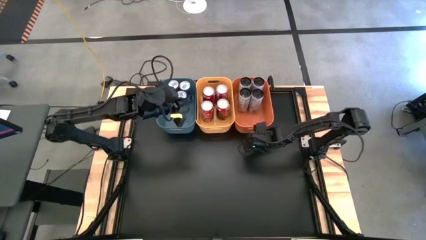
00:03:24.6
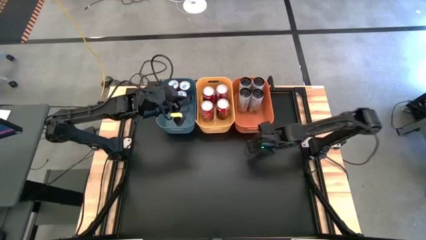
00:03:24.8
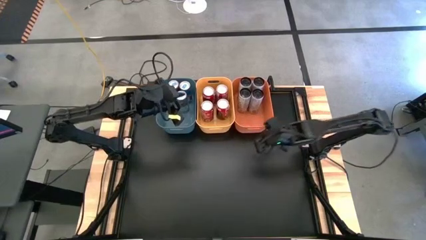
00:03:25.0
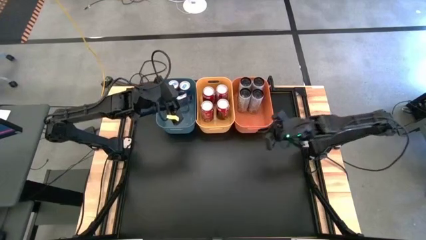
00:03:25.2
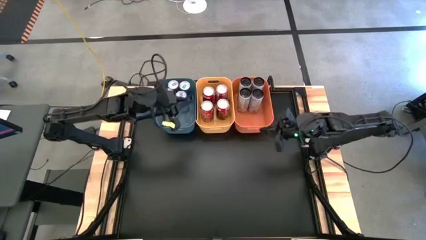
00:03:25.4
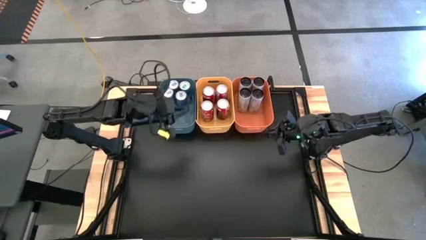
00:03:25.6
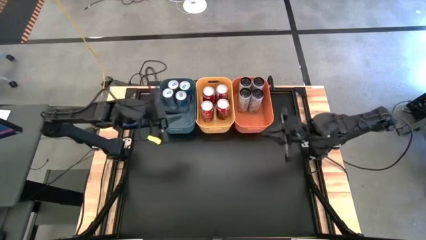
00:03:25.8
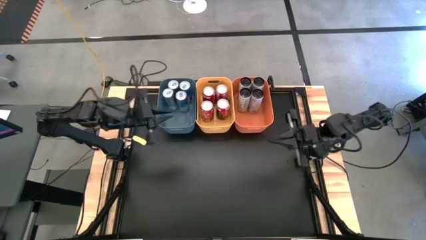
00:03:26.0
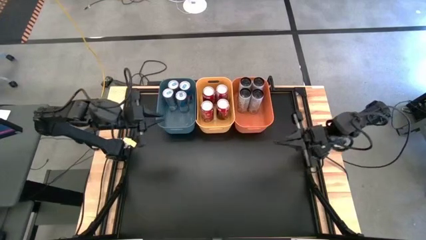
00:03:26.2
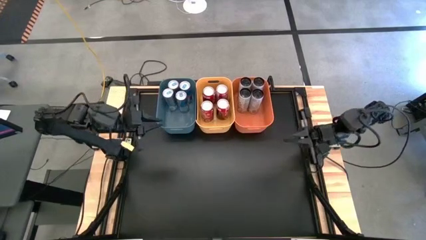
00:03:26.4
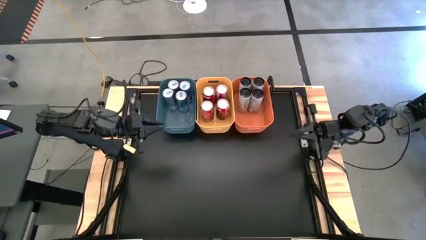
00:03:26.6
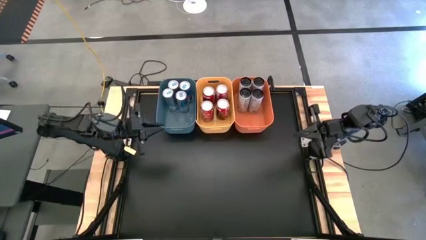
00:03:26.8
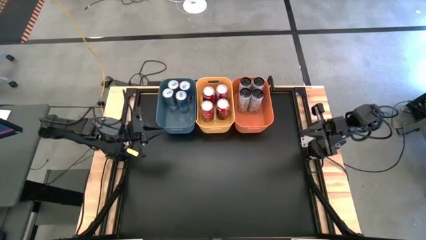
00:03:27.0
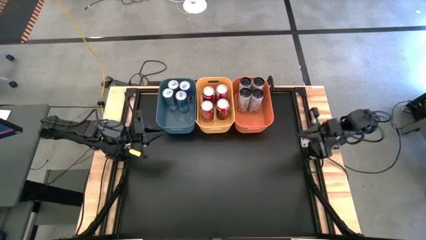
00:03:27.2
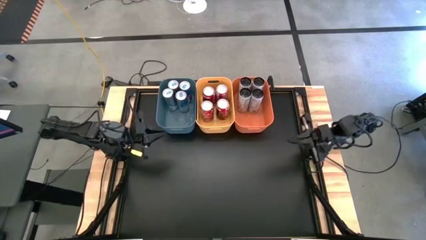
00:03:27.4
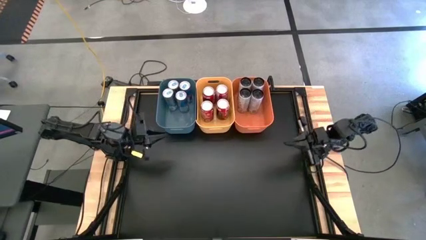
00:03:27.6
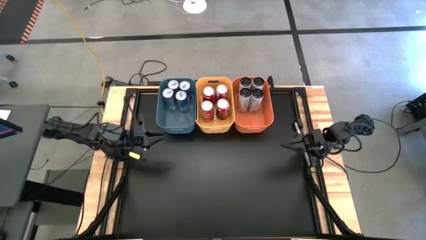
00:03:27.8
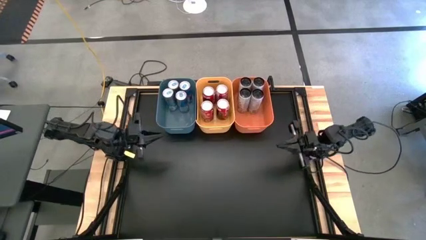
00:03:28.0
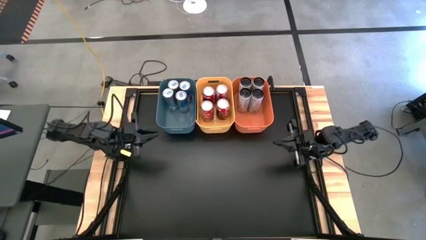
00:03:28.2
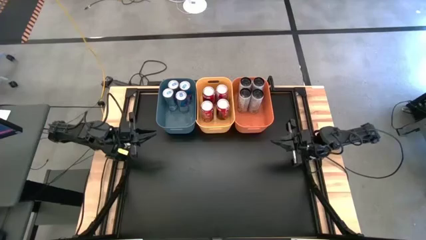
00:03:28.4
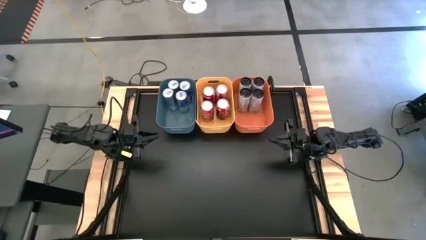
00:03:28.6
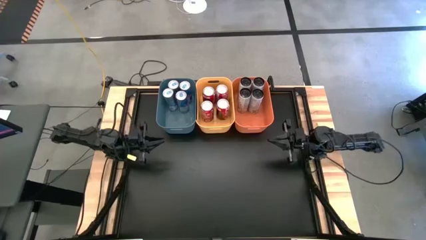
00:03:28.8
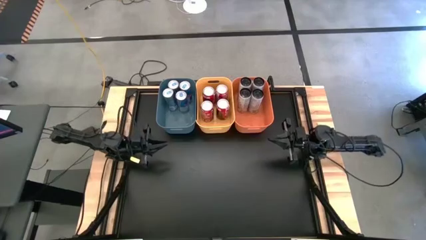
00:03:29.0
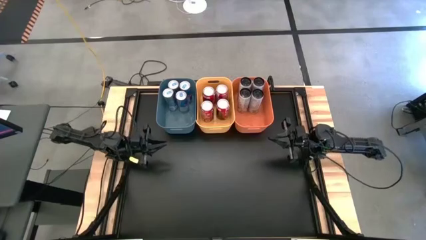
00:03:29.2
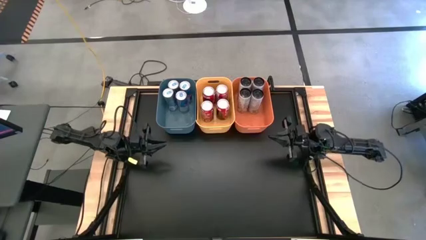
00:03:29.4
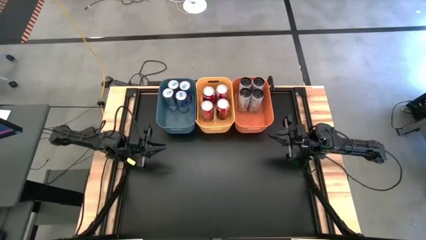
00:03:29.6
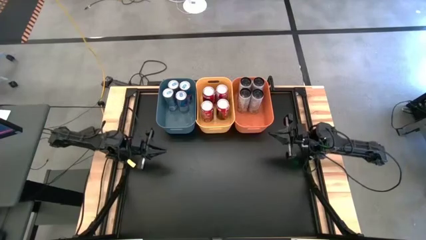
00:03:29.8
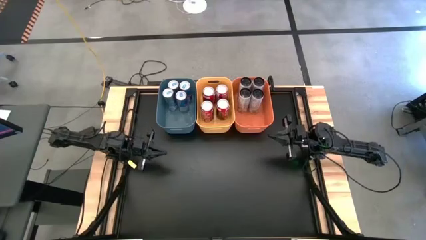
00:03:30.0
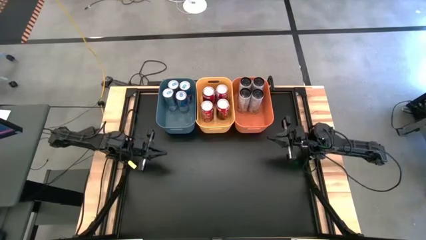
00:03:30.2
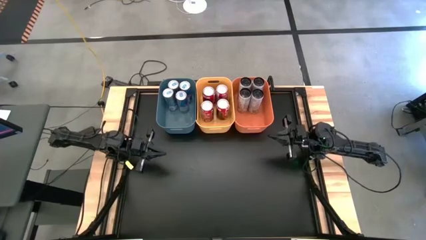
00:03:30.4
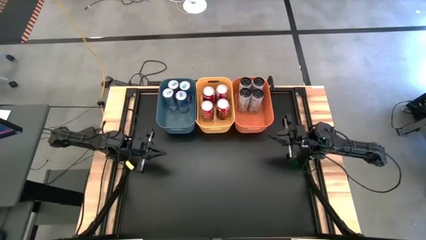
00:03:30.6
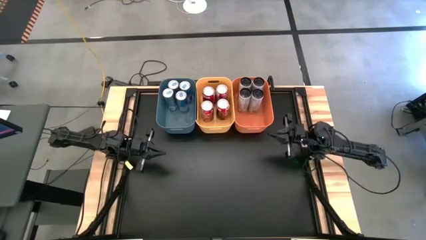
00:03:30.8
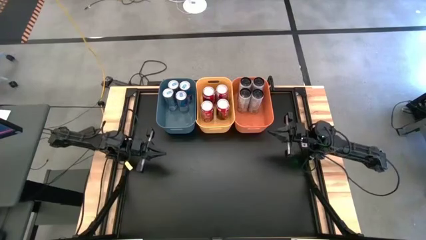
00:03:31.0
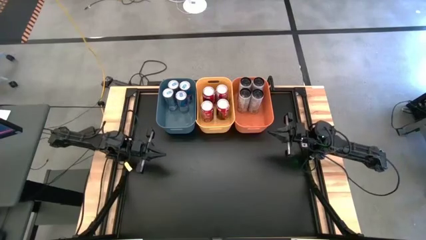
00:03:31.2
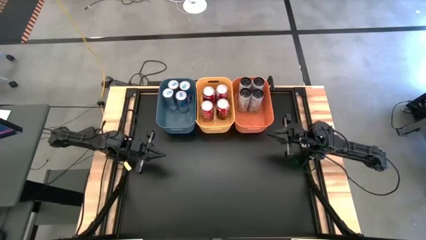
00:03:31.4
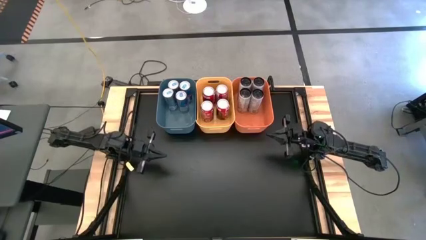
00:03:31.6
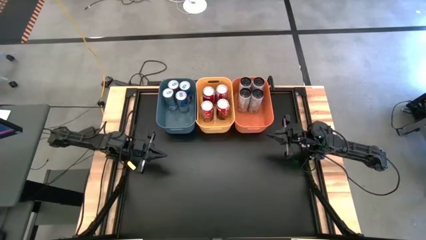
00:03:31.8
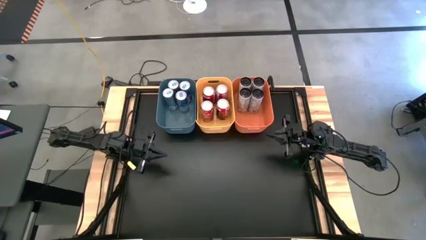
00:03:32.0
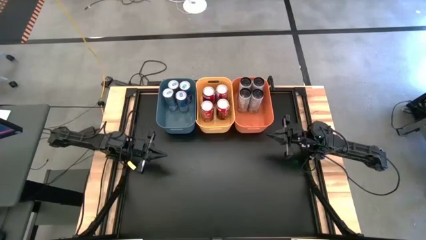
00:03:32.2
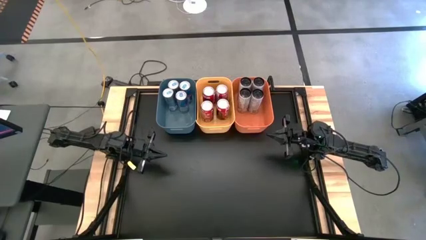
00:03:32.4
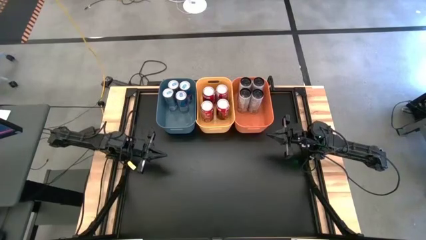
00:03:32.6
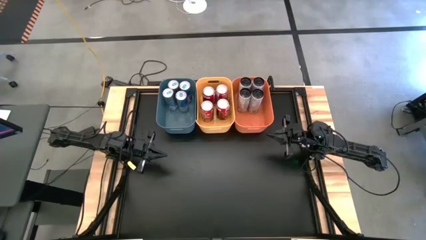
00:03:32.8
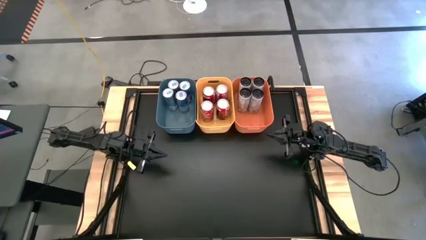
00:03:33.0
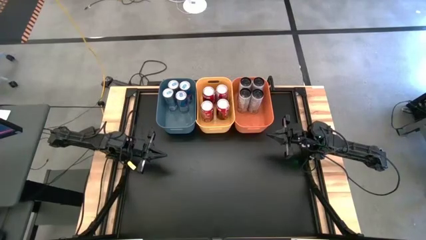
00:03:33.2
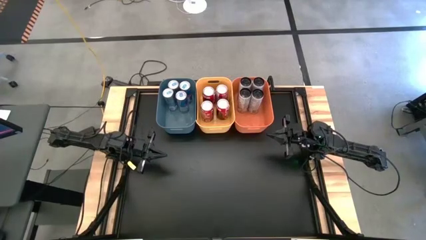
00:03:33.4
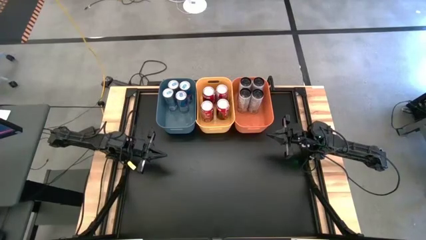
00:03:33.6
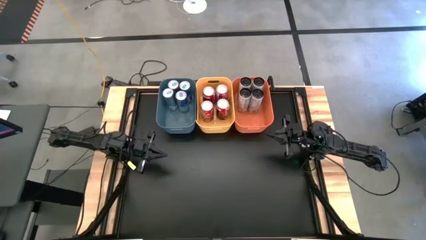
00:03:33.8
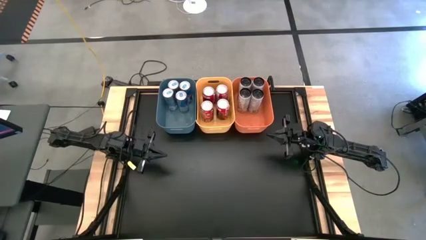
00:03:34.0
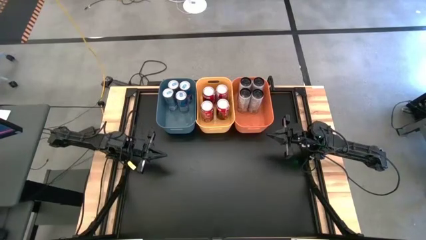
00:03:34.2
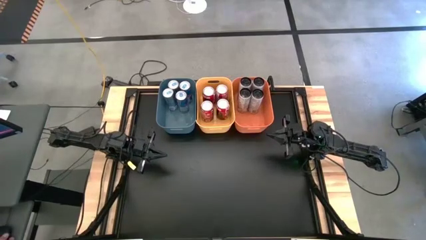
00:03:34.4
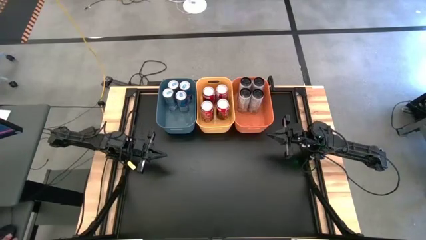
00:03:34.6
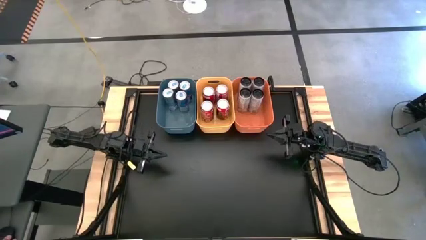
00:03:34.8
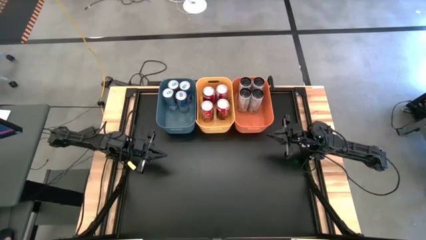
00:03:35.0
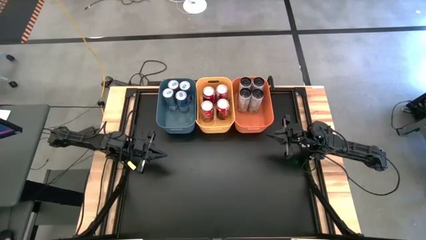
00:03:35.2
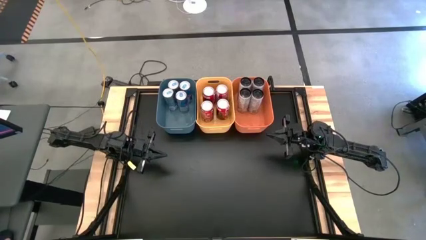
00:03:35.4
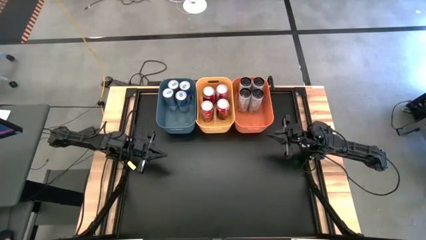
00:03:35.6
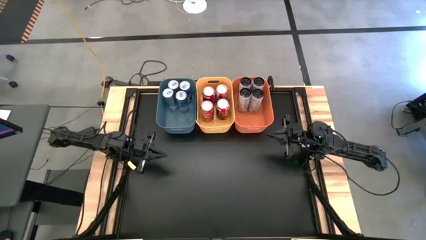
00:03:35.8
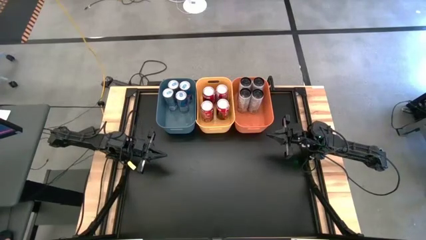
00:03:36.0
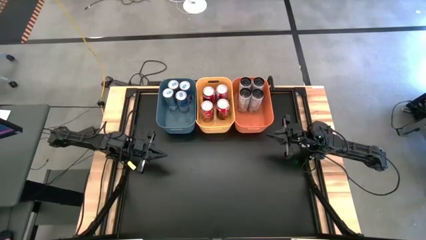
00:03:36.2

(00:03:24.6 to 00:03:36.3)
Task: Sort soda cans
Return to Home Position

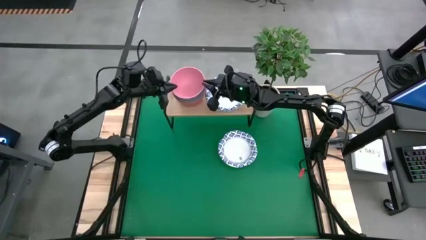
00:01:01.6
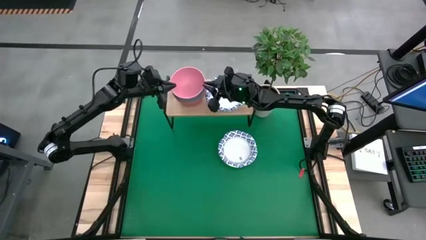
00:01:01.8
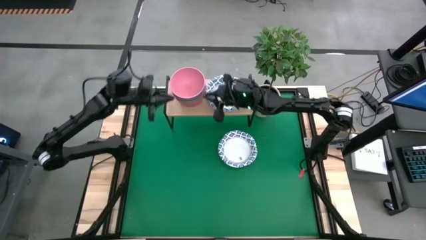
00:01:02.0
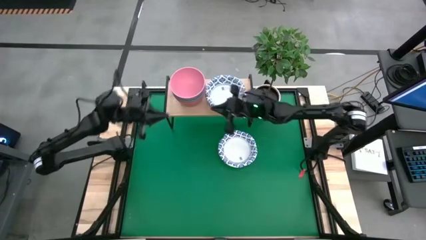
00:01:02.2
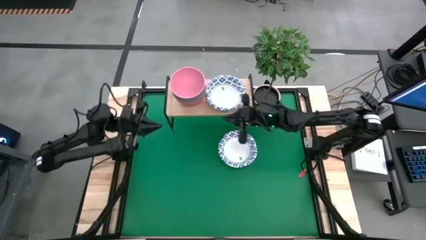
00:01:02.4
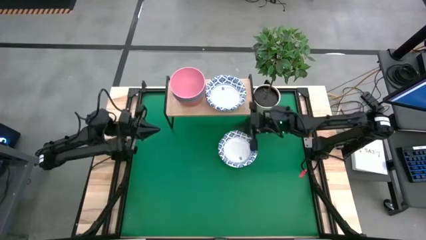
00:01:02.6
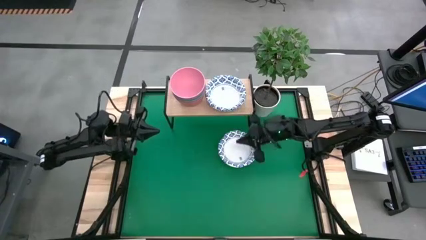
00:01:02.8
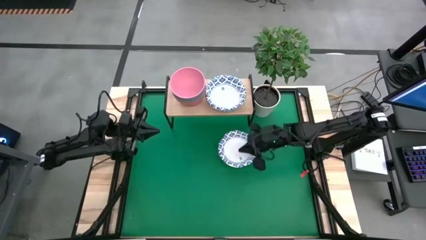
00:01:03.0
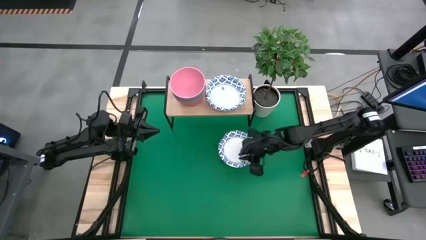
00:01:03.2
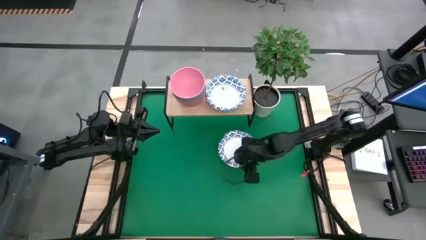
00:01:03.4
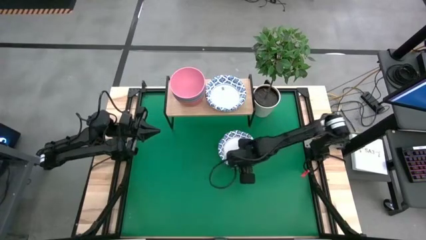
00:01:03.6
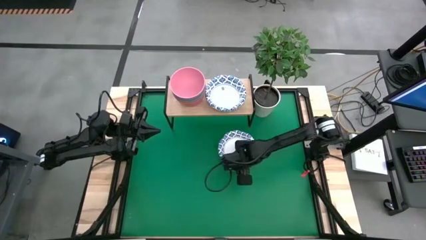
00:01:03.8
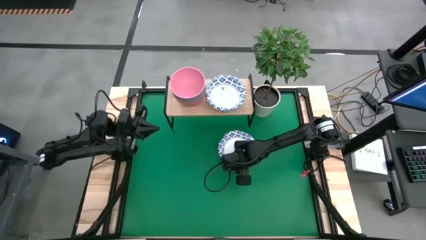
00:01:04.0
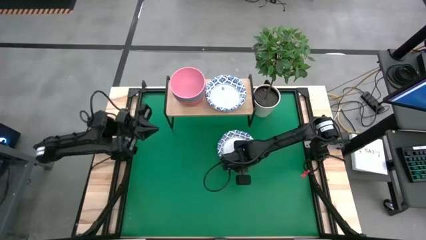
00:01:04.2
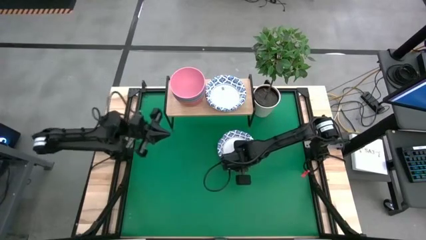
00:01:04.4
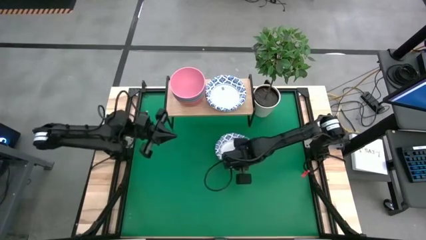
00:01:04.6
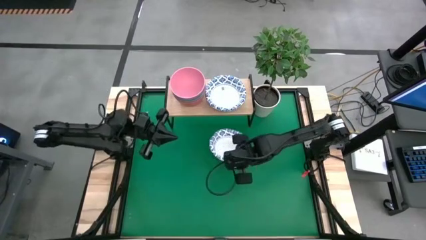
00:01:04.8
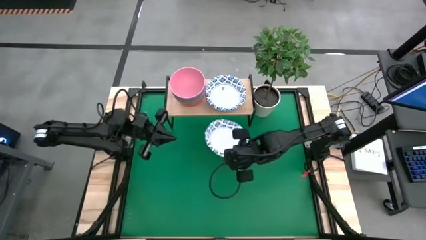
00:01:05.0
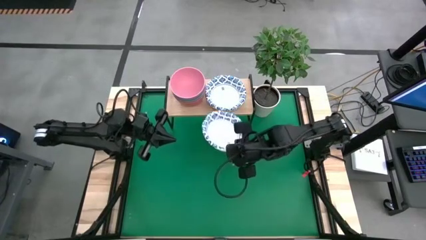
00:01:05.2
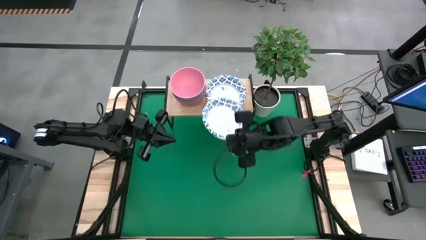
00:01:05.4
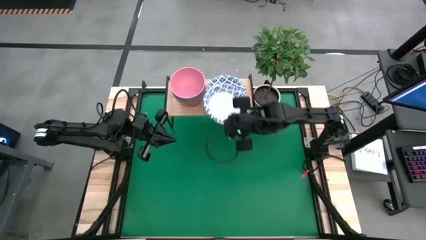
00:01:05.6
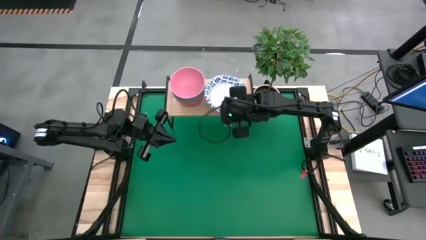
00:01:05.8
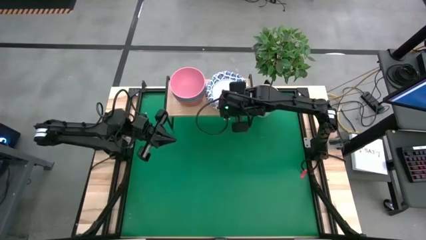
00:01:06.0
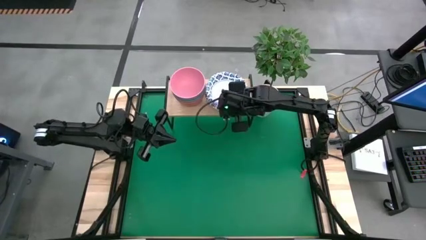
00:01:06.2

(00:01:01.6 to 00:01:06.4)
Task: Place and stack bowls onto a shelf
Stack the white patterned bowl on top of the other white patterned bowls on the shelf
